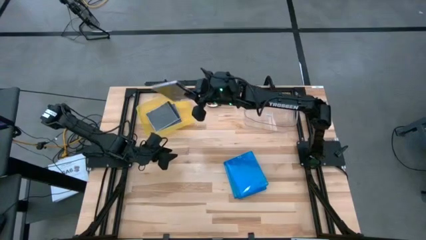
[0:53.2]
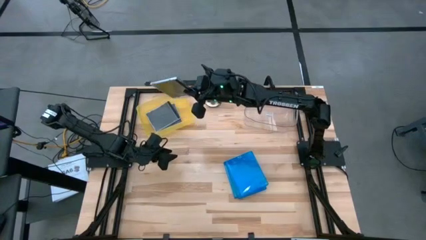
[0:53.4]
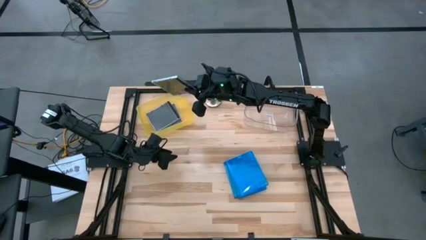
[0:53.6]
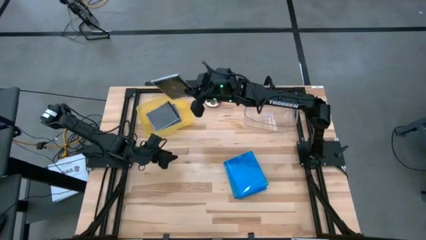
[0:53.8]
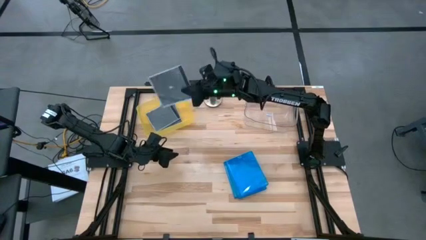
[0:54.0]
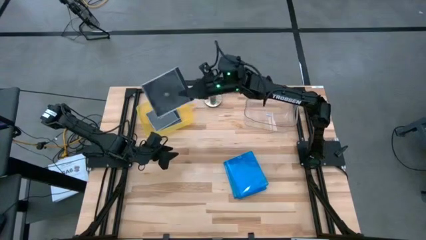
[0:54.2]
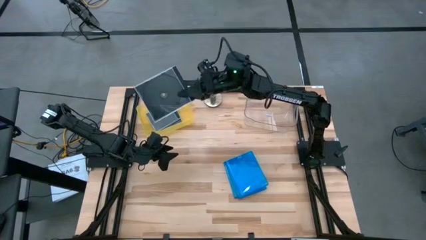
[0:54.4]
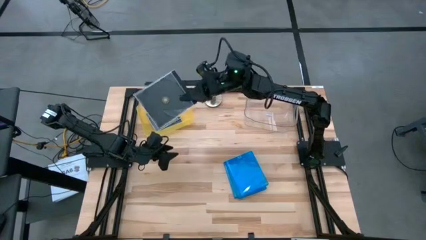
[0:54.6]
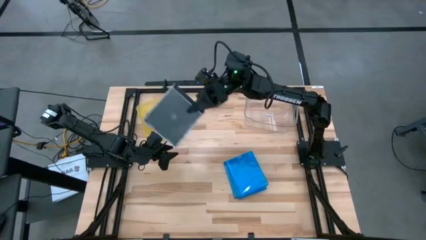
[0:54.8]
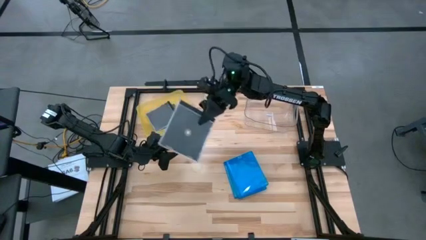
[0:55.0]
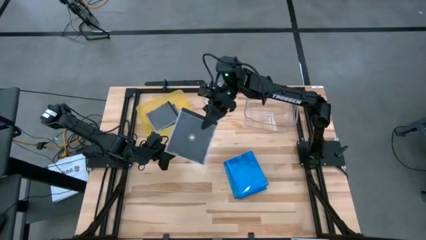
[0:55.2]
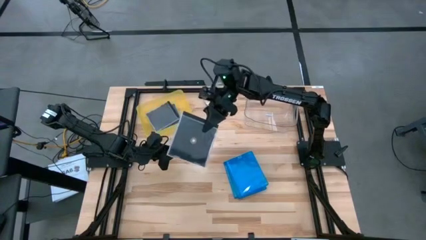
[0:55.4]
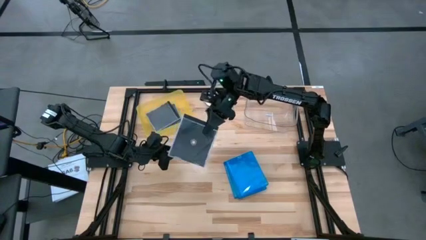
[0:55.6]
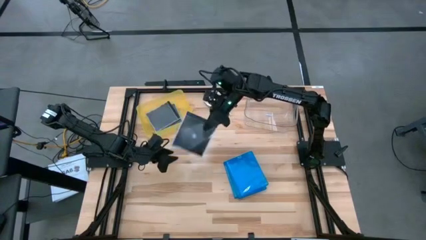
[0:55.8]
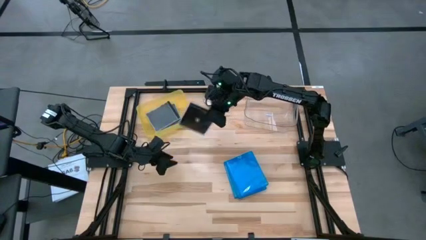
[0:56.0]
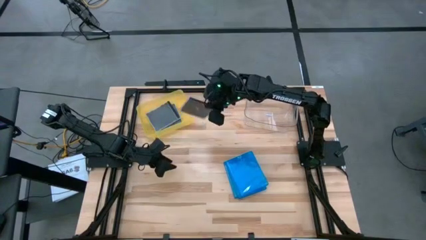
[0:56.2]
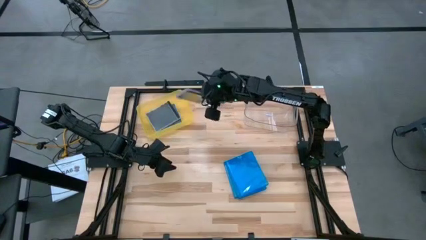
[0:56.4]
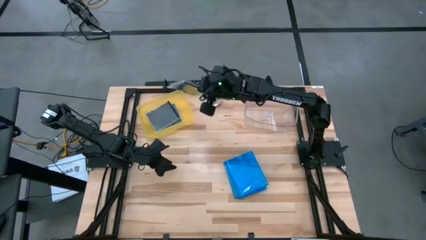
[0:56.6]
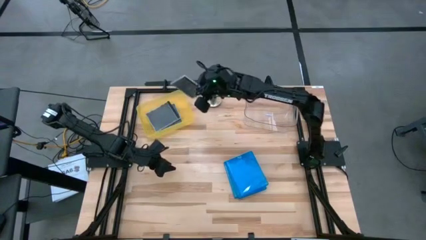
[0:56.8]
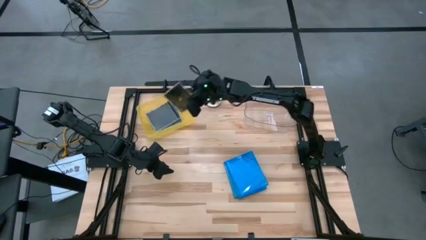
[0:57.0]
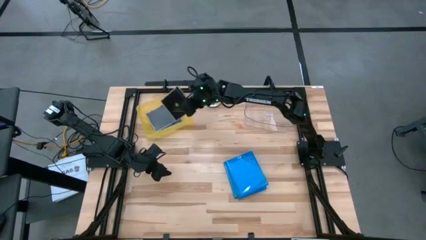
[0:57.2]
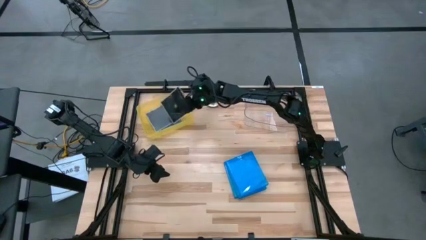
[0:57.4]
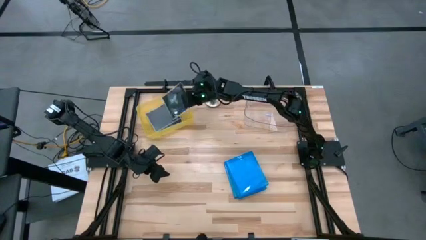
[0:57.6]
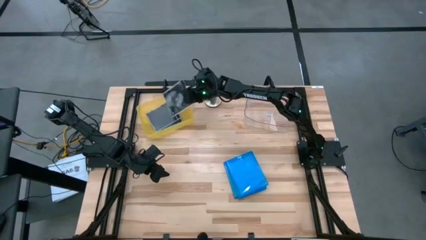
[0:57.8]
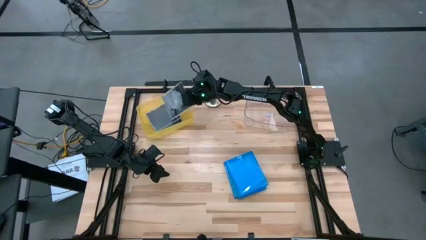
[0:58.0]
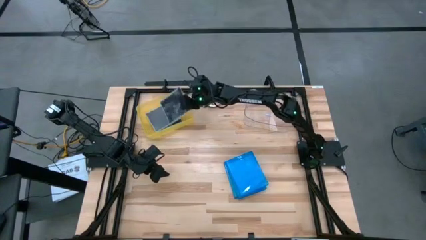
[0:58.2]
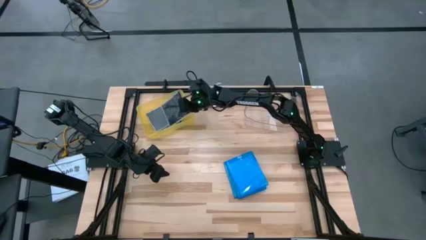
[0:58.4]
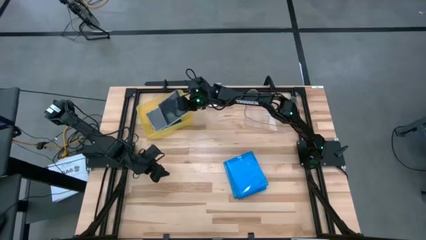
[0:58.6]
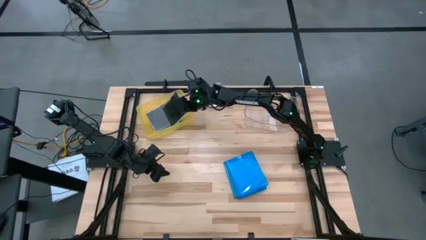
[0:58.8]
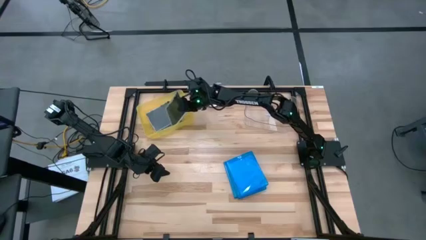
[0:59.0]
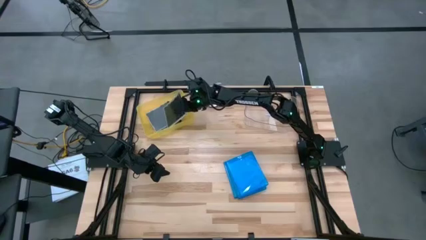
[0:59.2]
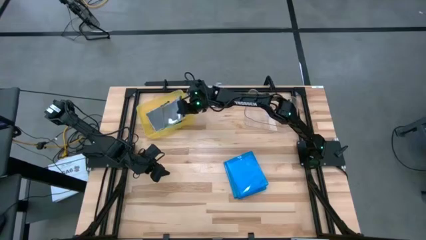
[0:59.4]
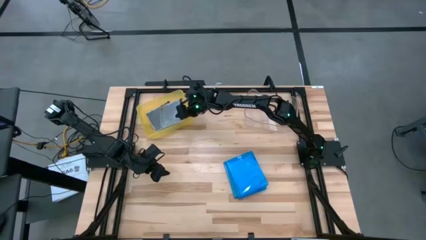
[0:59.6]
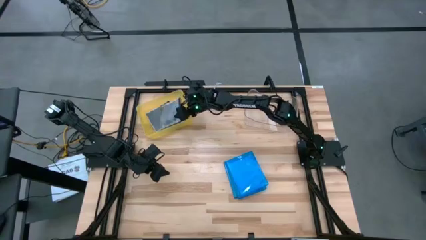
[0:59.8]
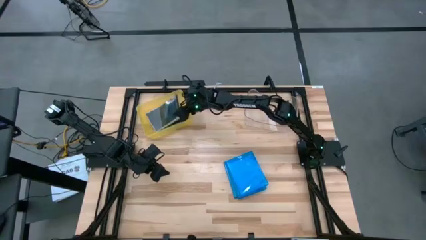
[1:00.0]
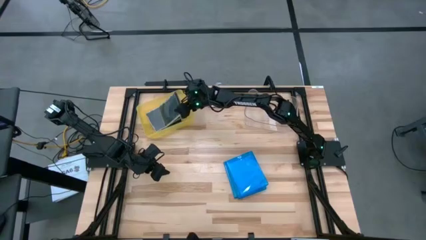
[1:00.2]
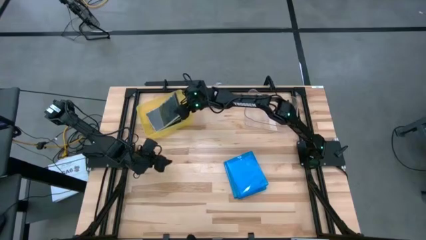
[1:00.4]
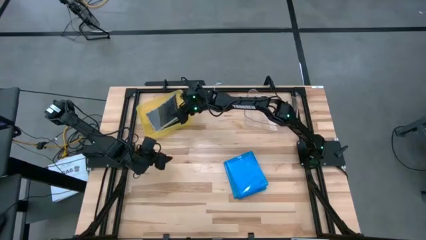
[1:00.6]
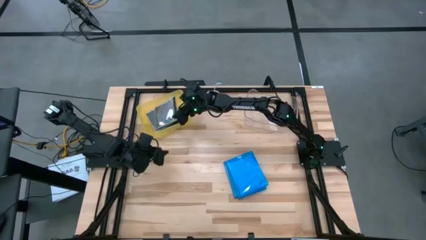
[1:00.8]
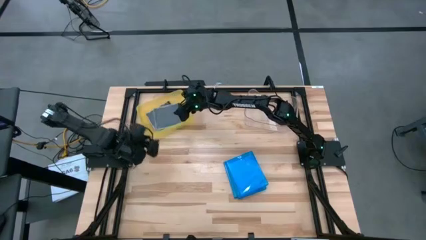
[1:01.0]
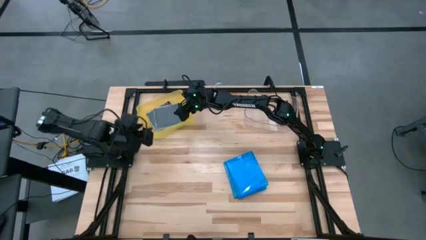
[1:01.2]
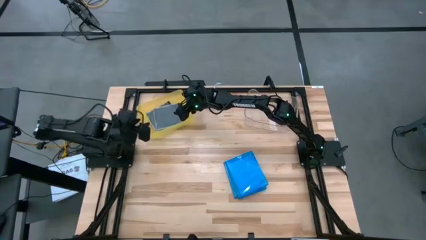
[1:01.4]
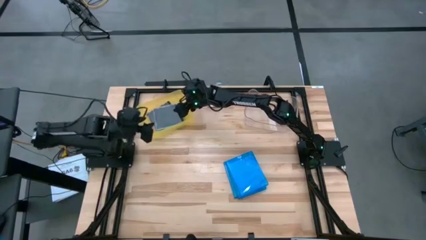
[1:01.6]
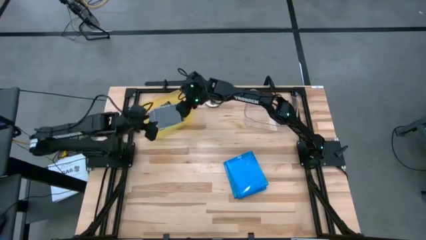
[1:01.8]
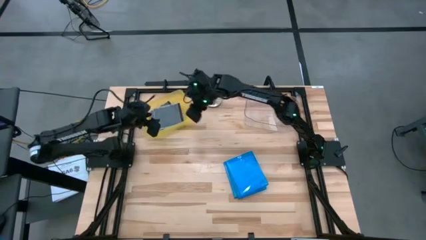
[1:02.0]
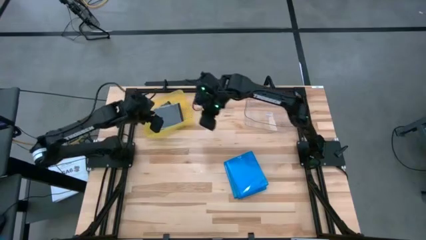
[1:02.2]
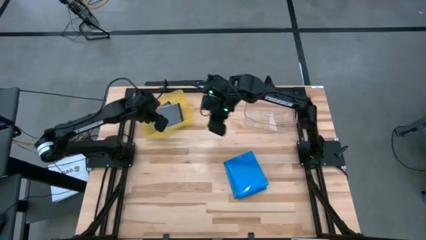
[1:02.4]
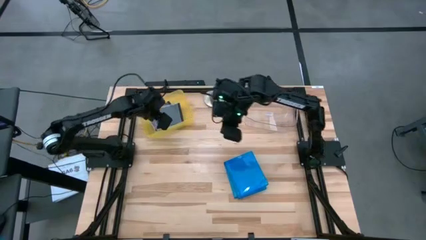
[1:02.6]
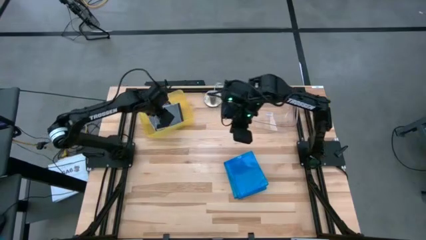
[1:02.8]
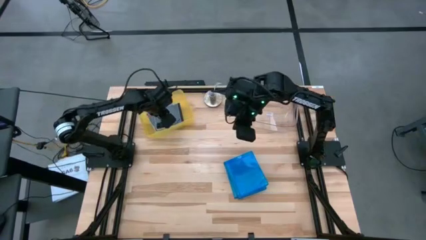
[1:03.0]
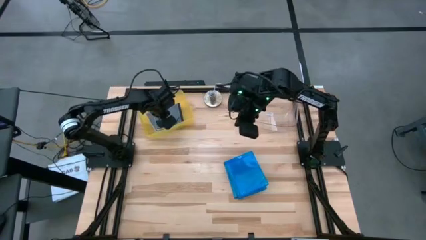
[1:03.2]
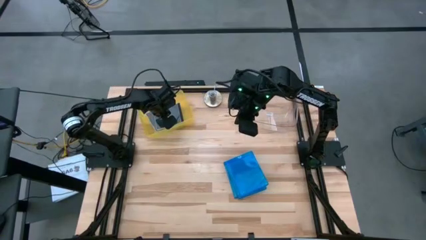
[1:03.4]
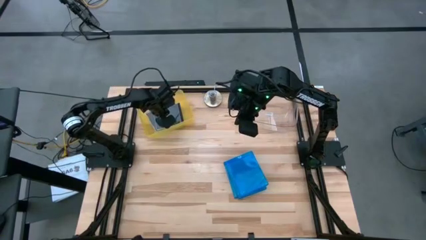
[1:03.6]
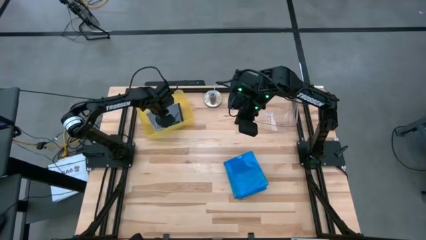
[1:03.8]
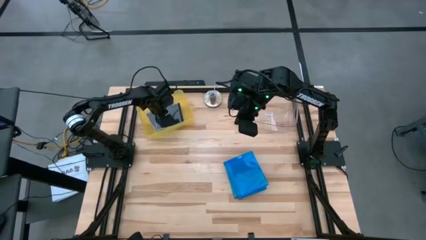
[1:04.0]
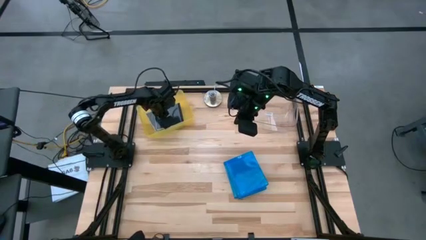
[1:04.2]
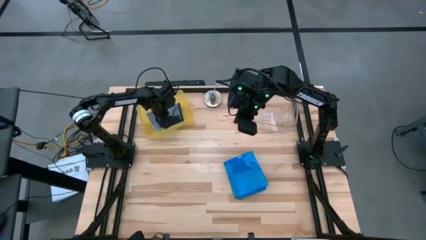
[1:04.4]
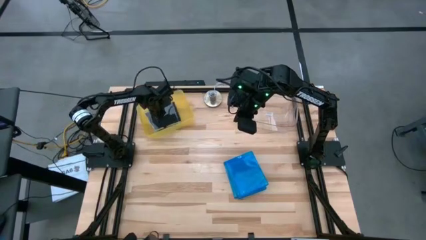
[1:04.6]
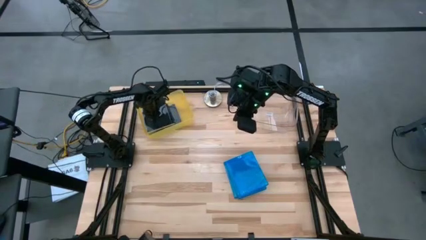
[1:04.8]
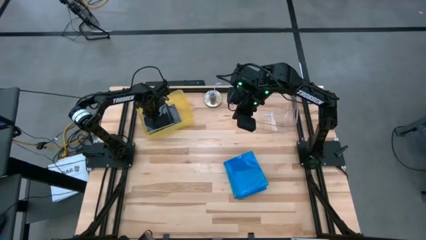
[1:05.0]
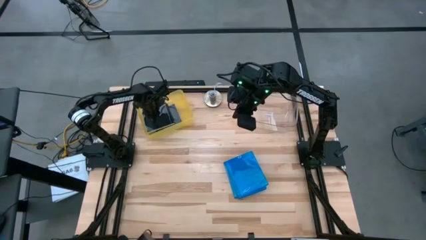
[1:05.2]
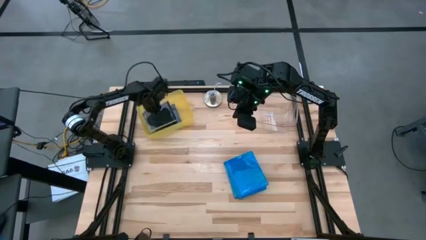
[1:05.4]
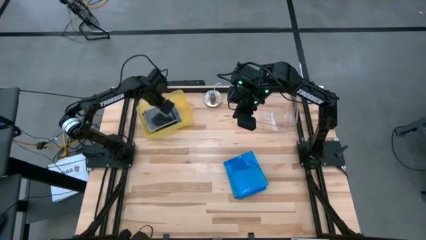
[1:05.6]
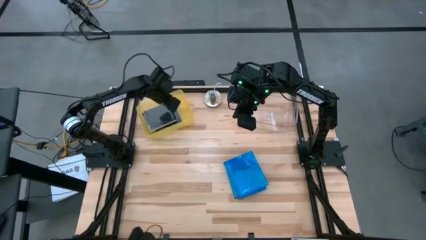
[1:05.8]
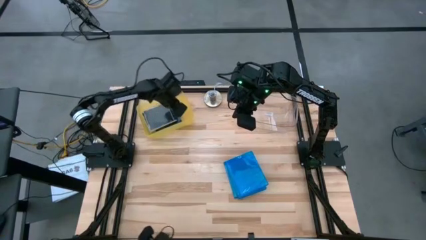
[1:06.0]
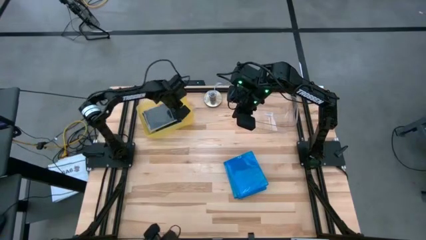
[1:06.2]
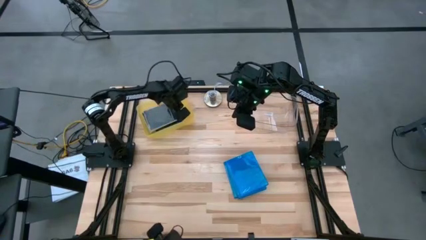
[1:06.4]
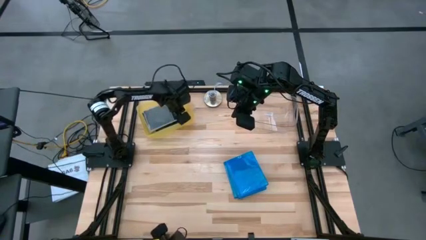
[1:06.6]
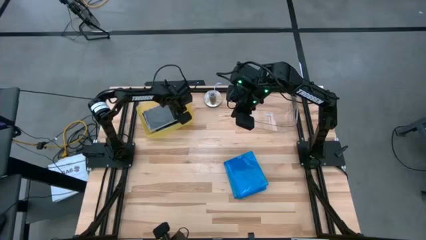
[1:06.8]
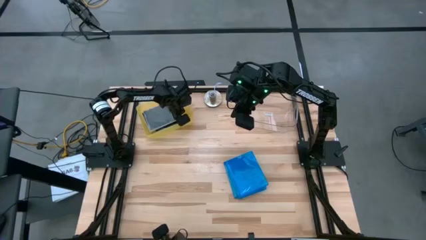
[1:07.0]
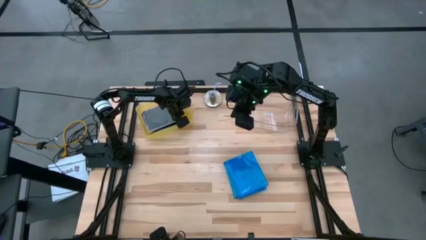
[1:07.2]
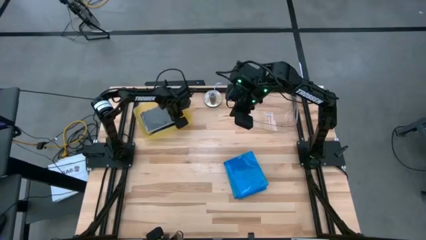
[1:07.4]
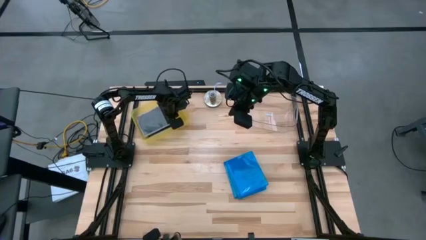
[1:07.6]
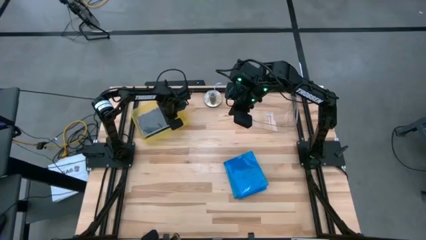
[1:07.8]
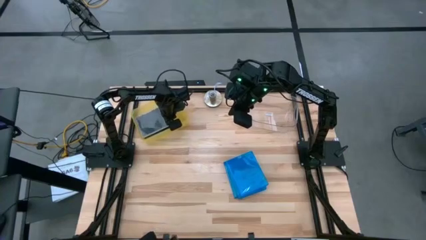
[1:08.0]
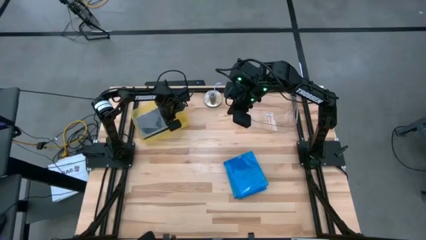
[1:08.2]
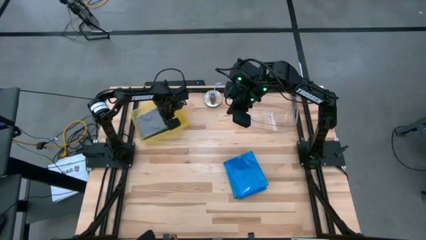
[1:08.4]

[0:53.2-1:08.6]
Task: Pick & place jewel cases by type
Put the black CD case into the yellow bin

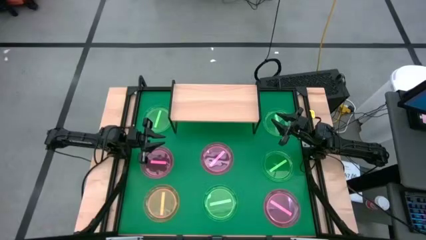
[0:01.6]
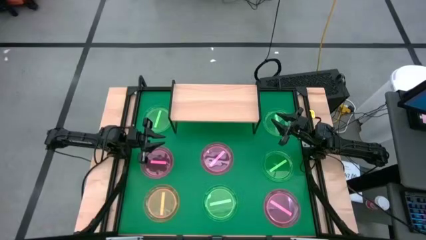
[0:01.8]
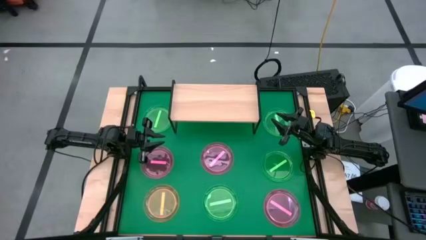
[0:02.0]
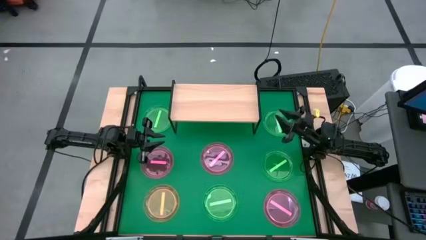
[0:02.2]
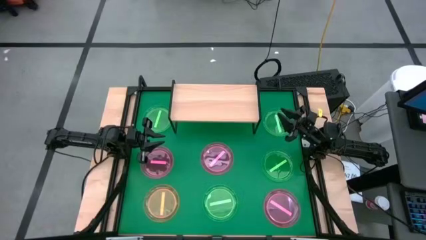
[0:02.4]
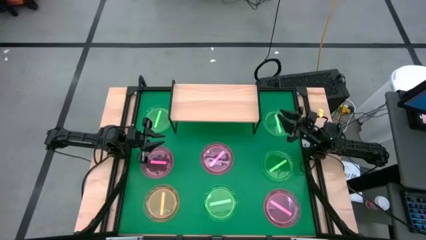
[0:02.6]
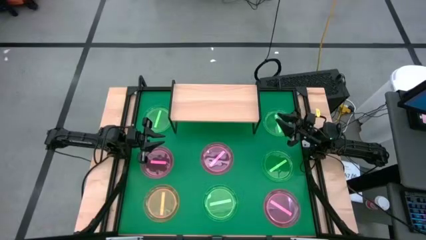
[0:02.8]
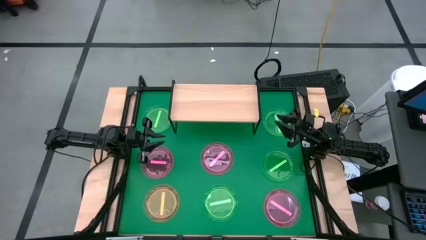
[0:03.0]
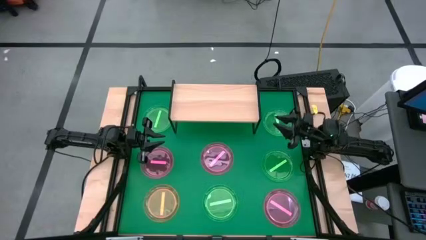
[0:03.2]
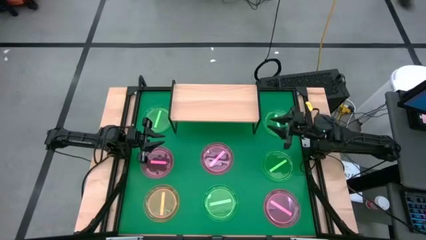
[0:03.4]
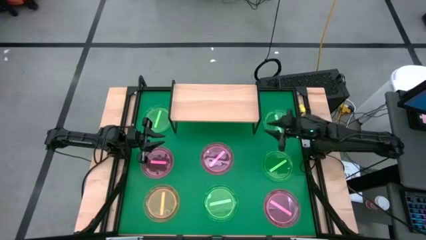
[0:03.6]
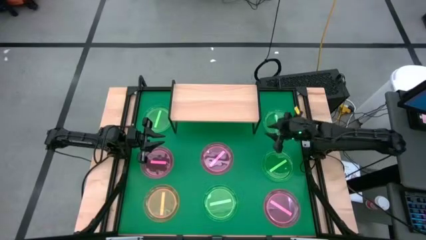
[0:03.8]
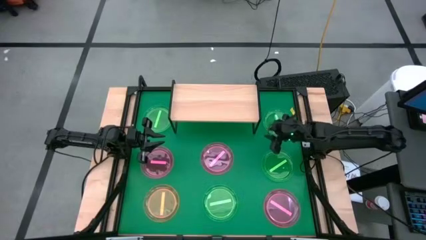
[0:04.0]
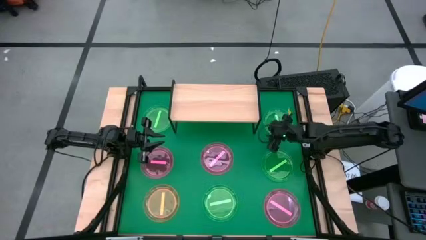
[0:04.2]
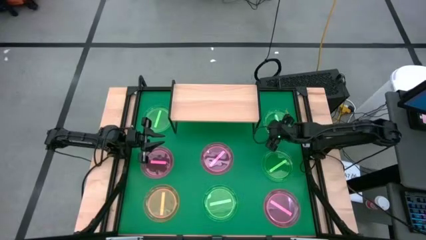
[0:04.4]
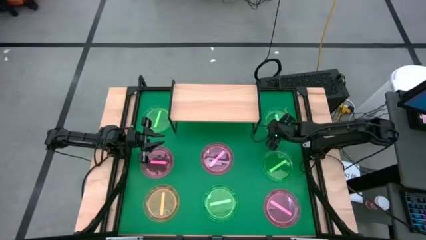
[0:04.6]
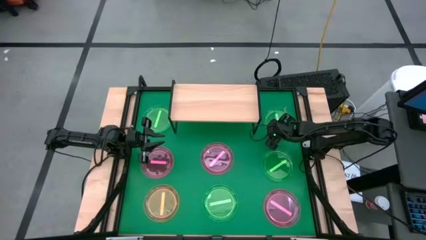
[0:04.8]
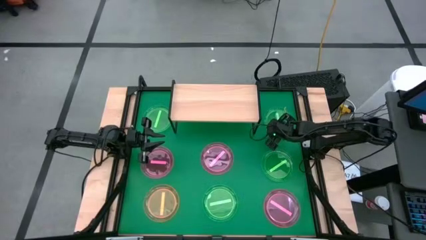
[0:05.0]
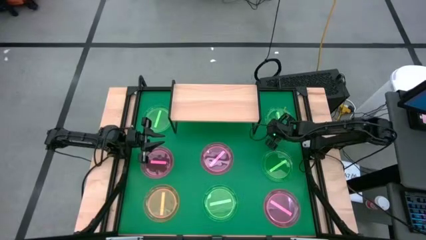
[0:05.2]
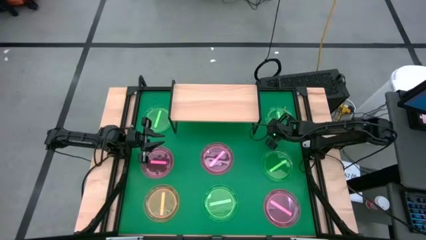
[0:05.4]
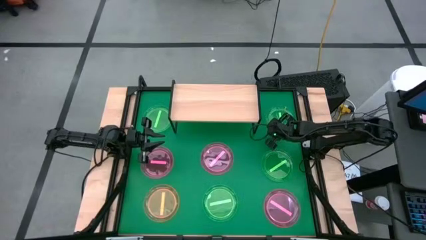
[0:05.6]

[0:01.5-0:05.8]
Task: Place and stack plates onto a shelf
Put the green plate on the shelf
